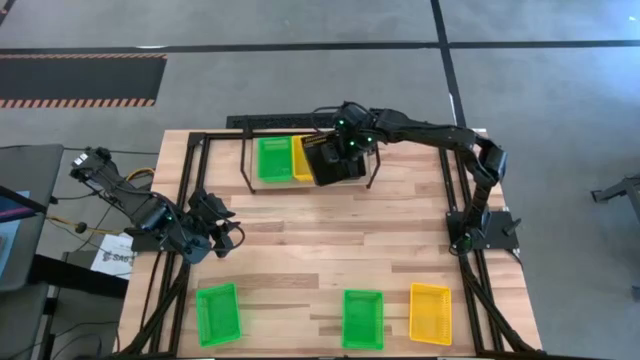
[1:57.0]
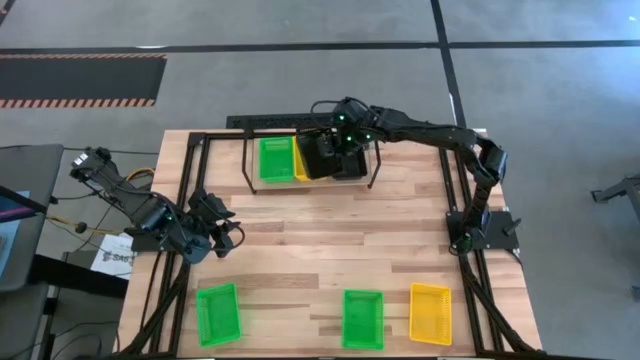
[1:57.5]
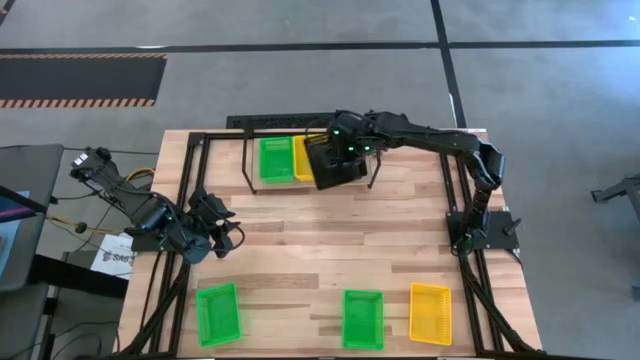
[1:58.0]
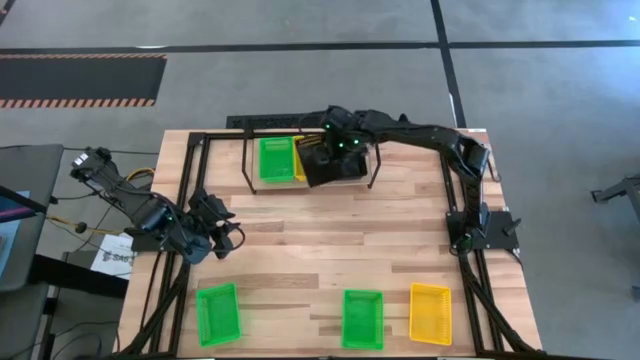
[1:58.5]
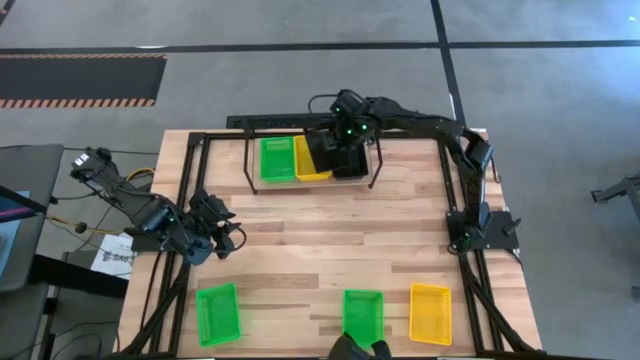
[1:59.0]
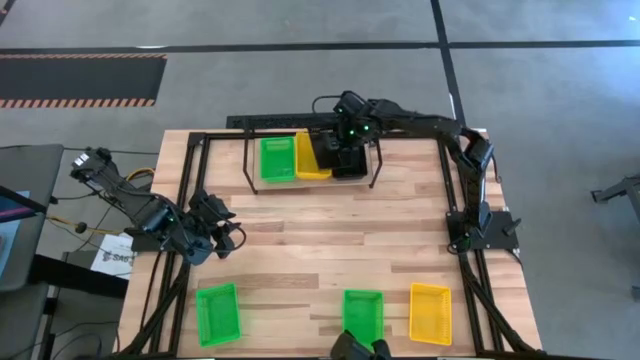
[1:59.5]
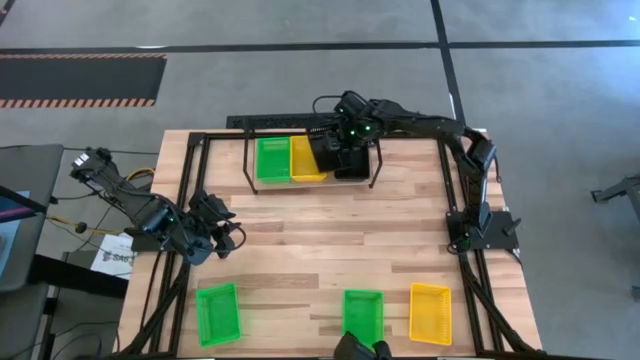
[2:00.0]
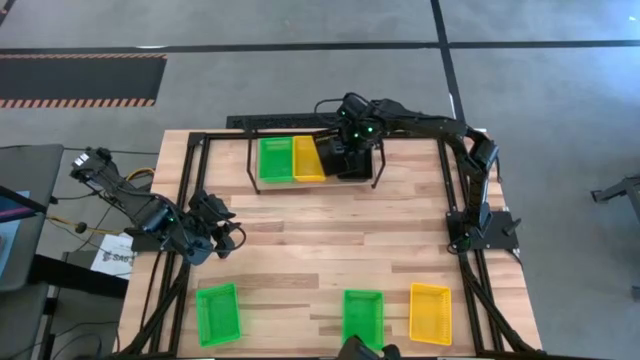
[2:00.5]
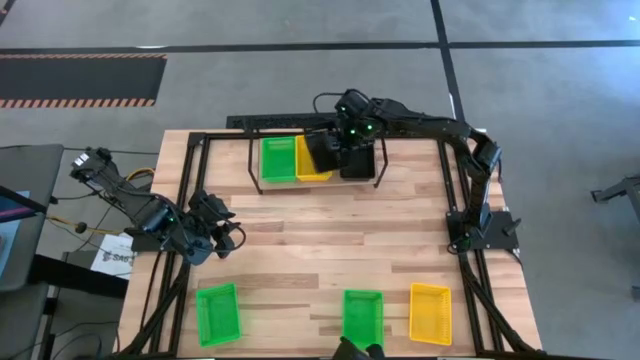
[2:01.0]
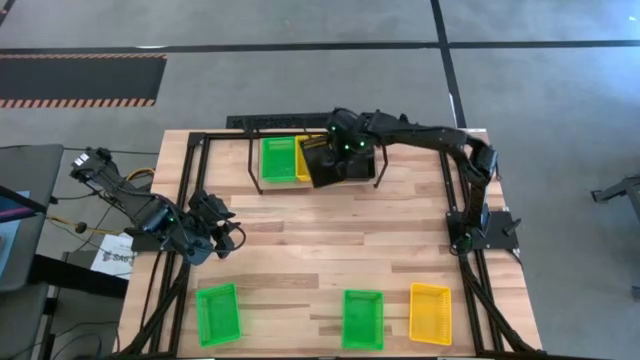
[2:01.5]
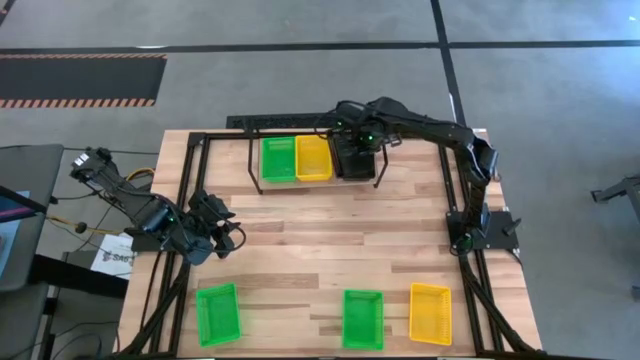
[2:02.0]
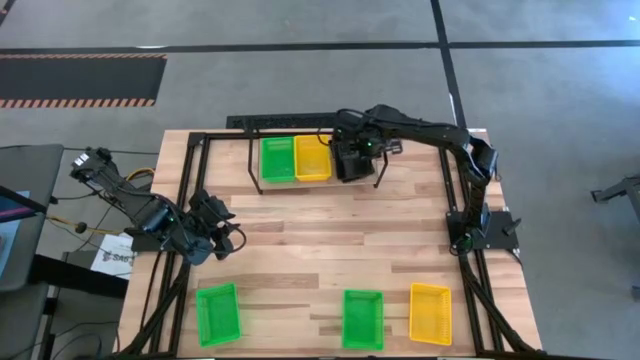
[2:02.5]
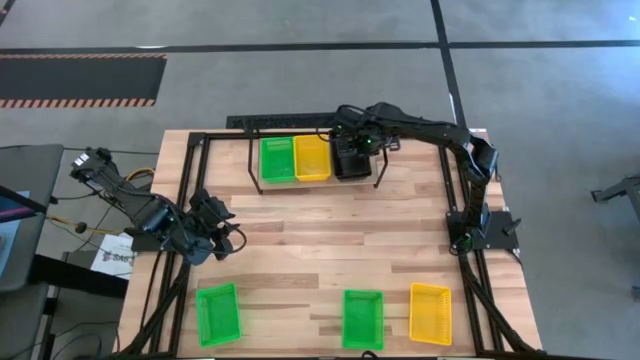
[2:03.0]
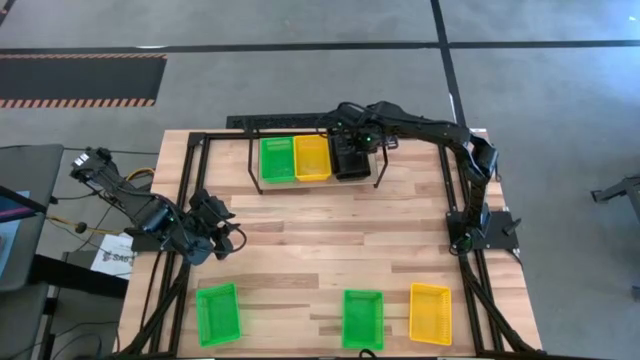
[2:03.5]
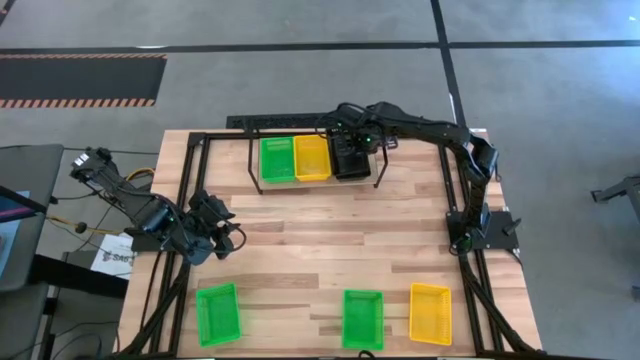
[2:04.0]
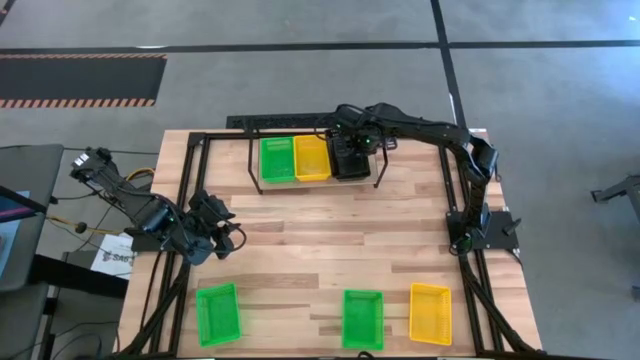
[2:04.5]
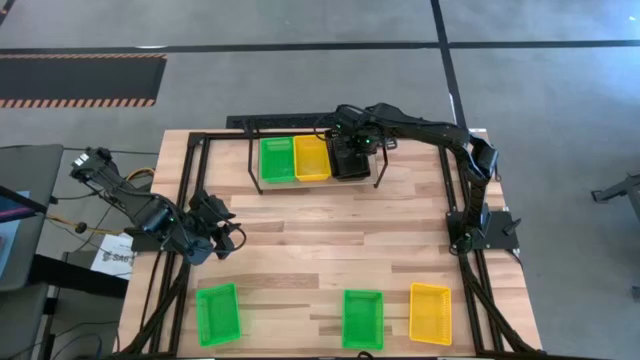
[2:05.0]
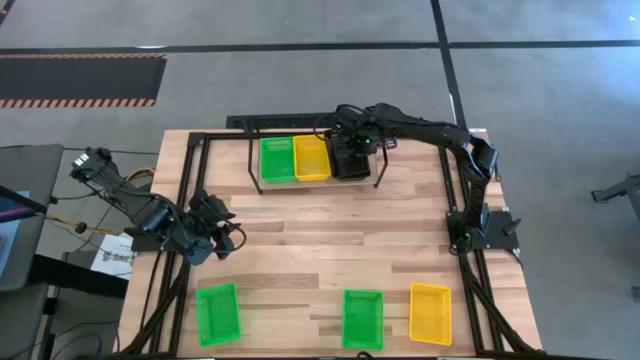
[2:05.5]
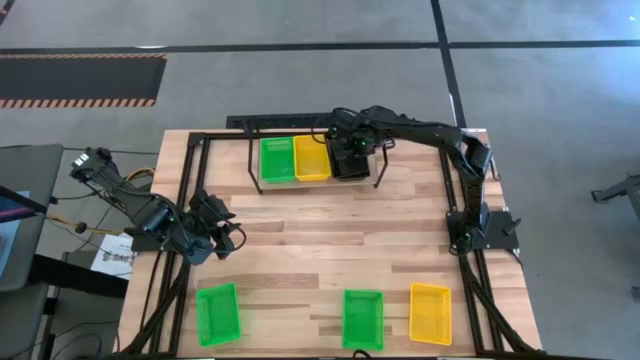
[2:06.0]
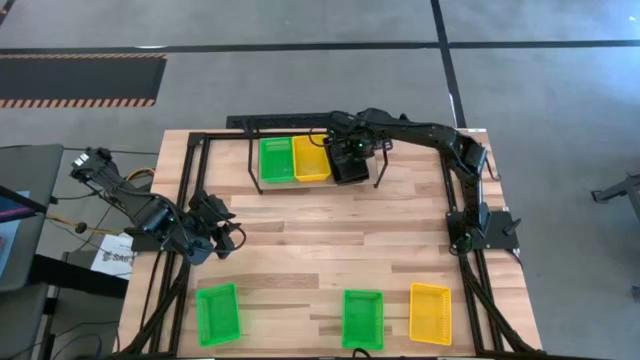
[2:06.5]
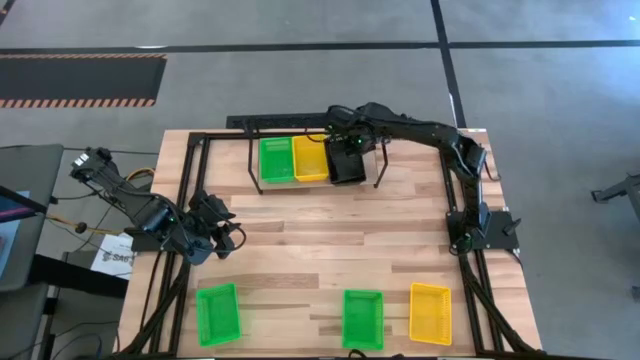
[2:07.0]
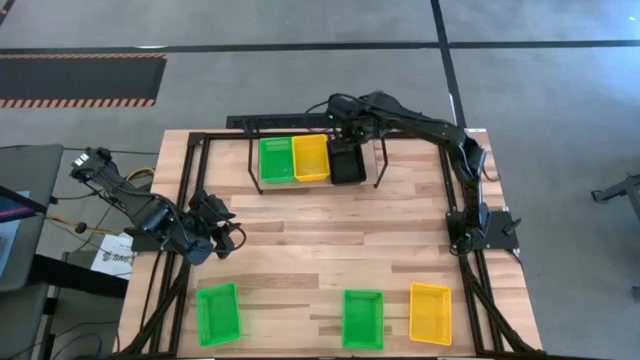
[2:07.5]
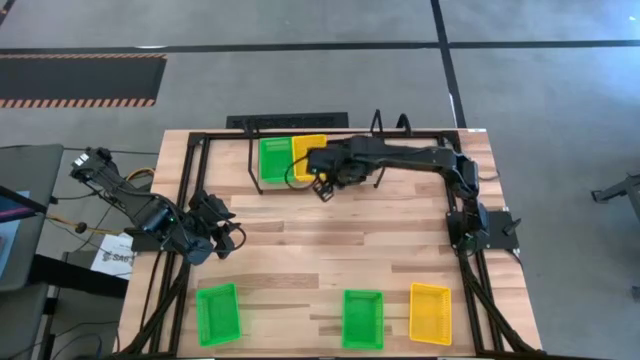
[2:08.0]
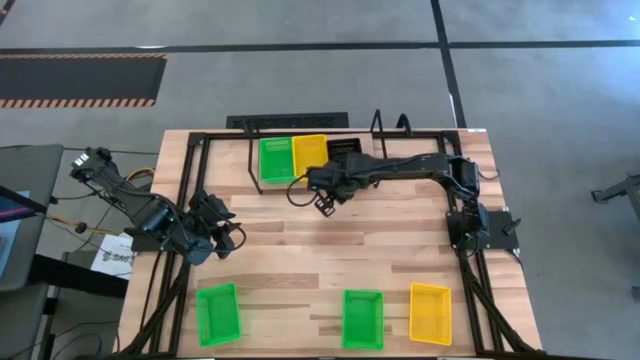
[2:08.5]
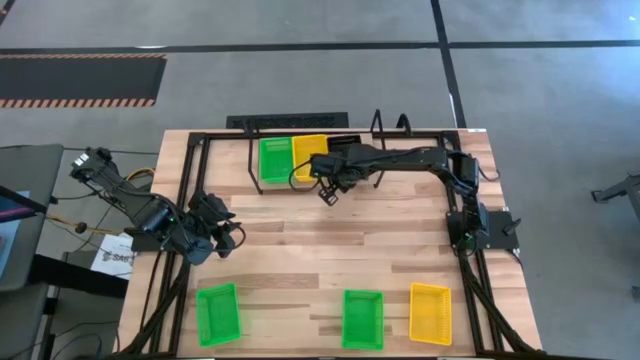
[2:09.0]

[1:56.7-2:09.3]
Task: Stack baskets on shelf by color
Stack the black bin on top of the black bins on the shelf

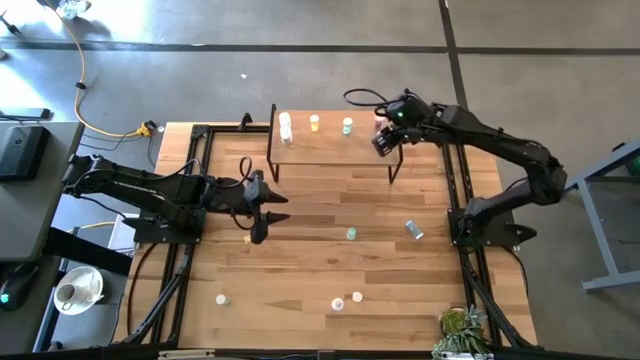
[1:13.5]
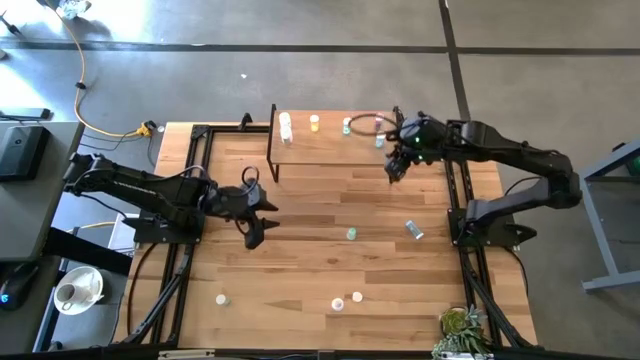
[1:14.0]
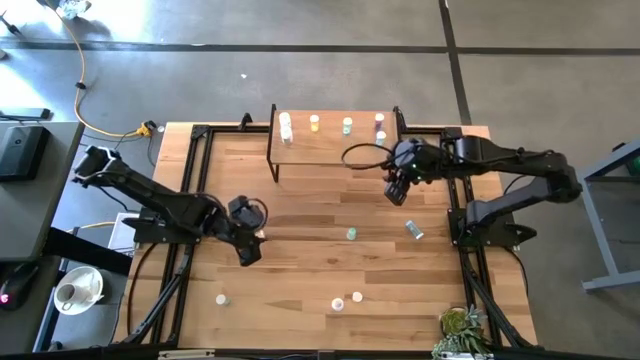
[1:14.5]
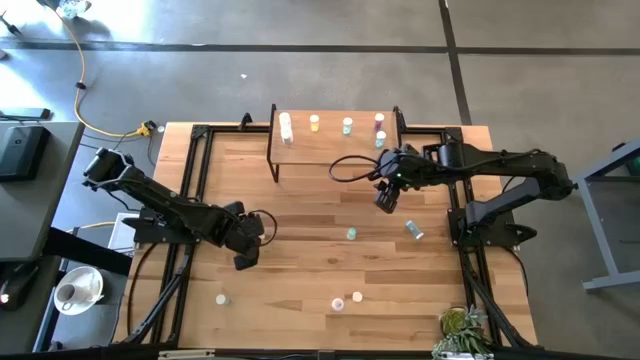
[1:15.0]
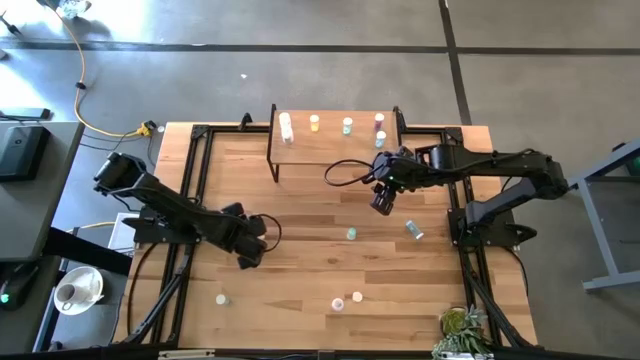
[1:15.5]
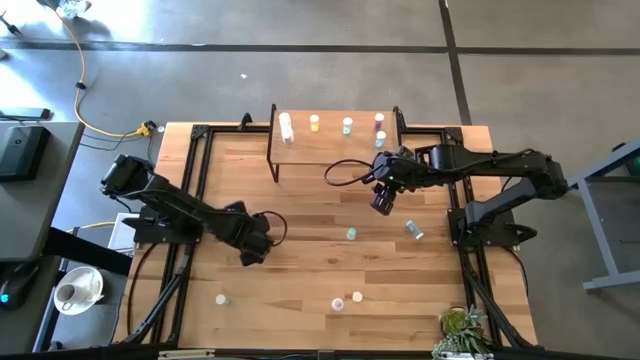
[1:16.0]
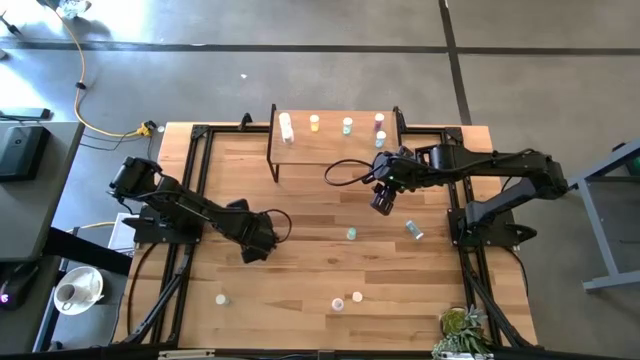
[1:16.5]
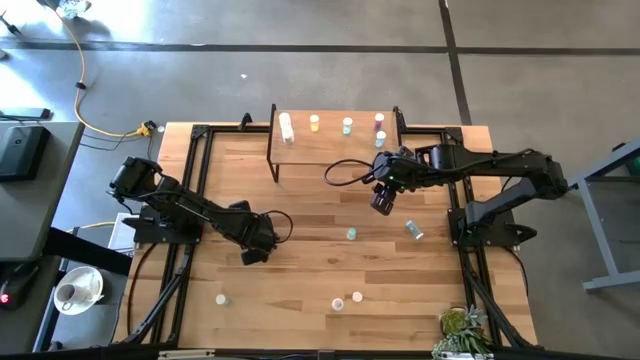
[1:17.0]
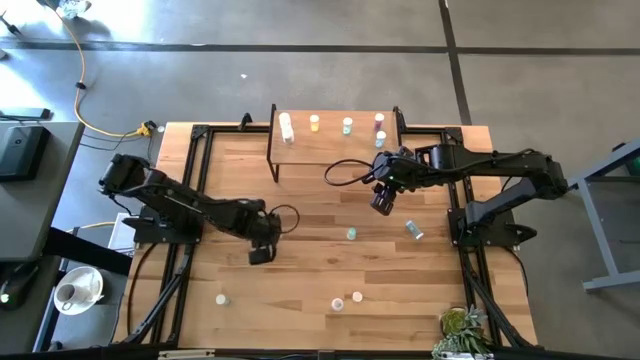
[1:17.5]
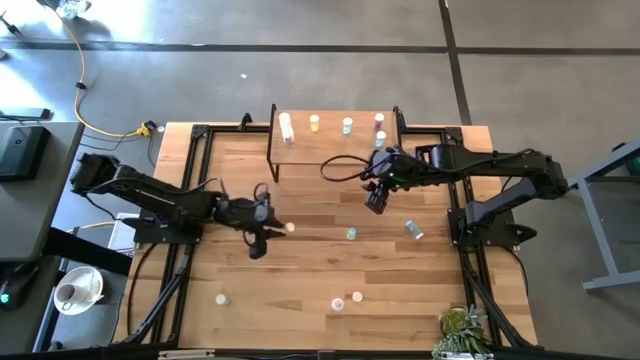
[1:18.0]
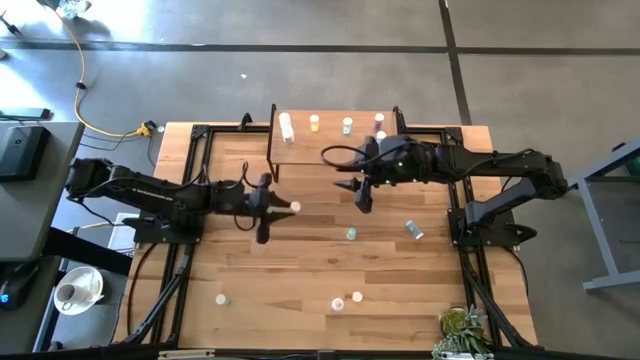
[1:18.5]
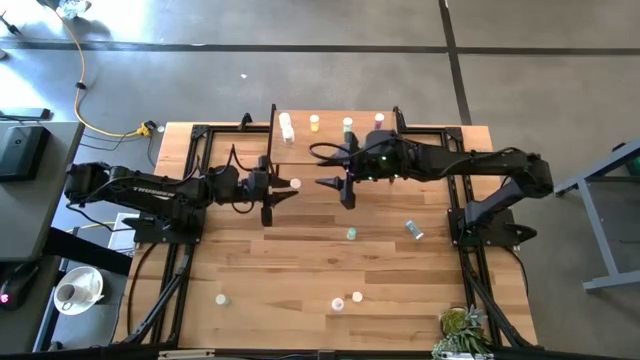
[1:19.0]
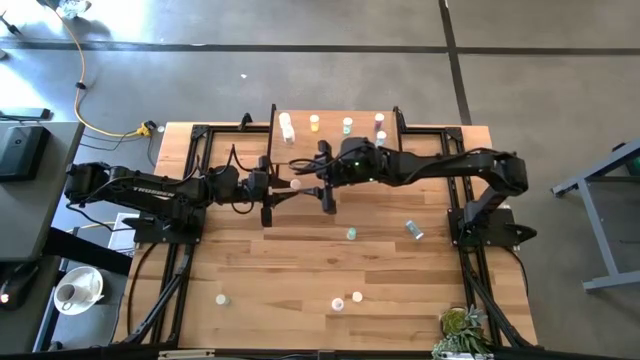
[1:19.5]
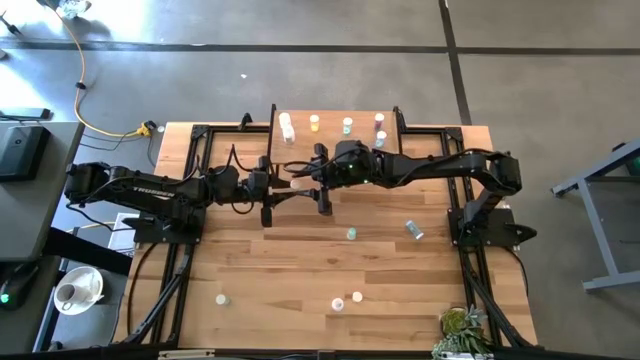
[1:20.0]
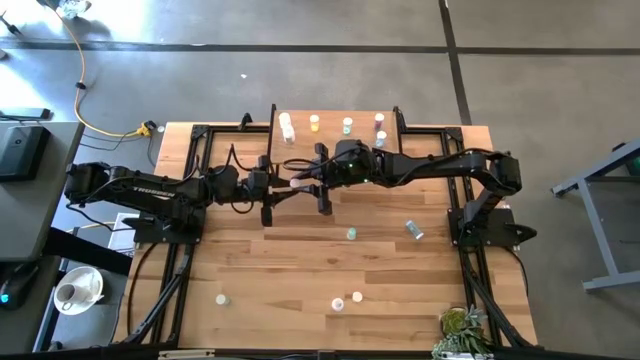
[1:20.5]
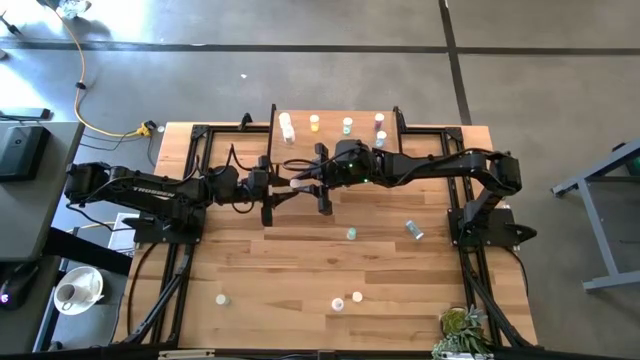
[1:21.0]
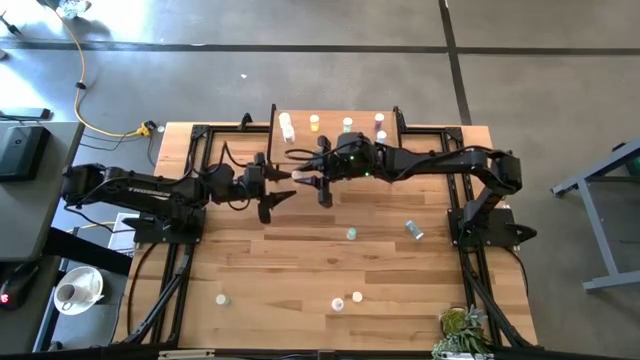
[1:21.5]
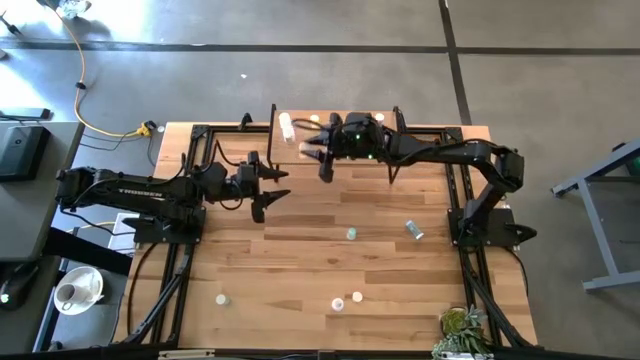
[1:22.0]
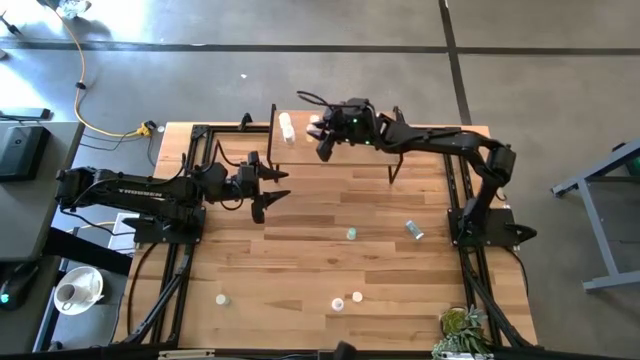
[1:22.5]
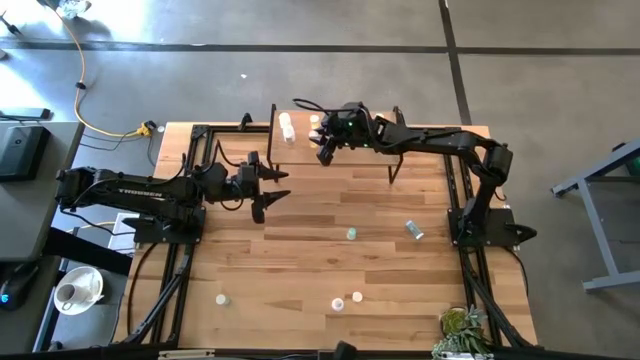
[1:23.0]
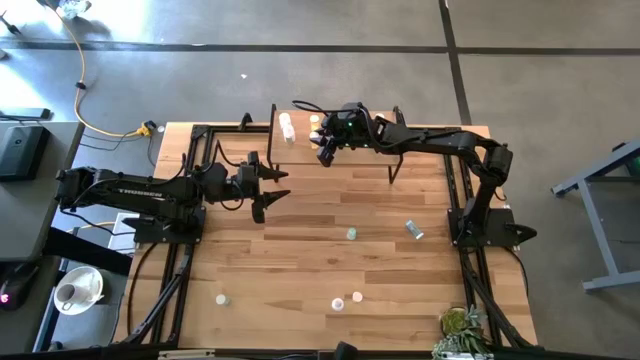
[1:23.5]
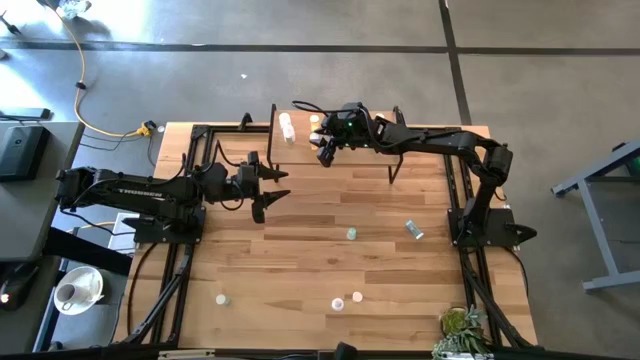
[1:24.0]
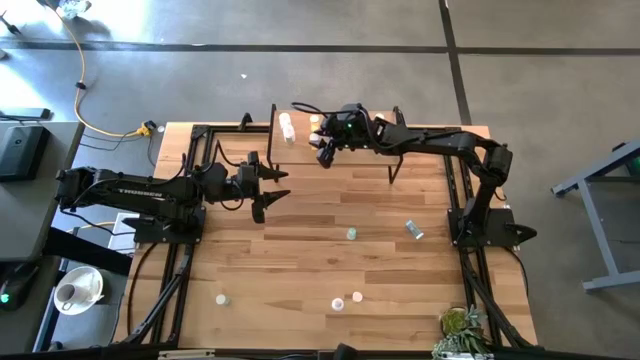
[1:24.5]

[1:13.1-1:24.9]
Task: Pick and place medicine bottles onto shelf by color
Put the top yellow pill bottle on the shelf aligned with the other yellow pill bottle
